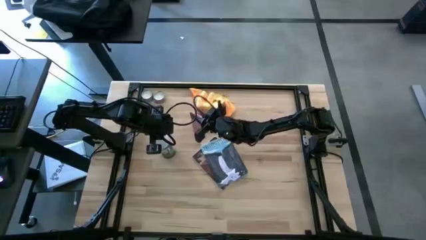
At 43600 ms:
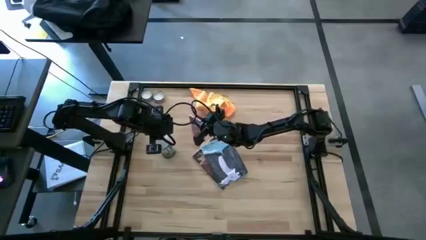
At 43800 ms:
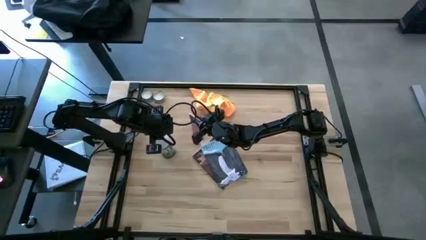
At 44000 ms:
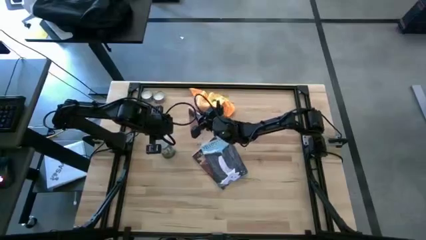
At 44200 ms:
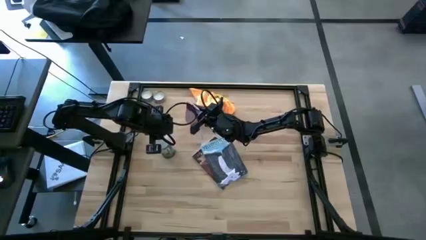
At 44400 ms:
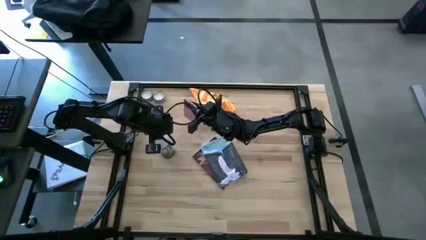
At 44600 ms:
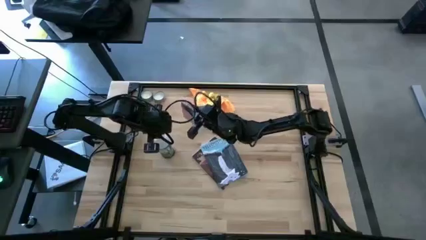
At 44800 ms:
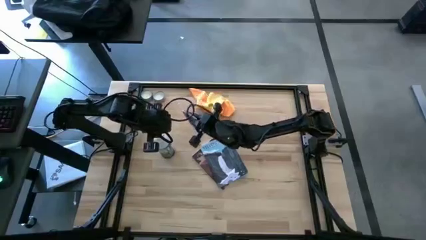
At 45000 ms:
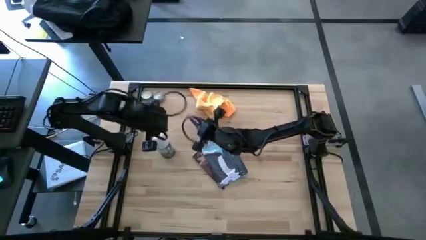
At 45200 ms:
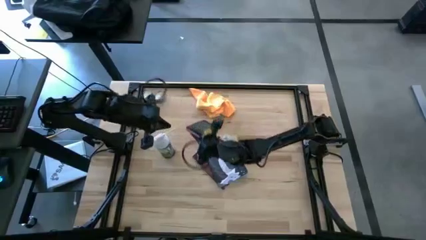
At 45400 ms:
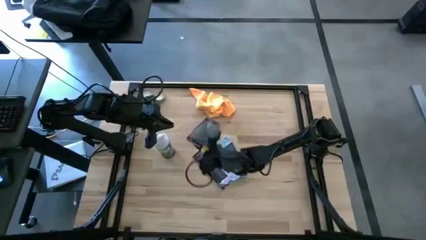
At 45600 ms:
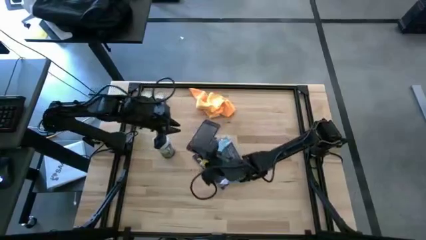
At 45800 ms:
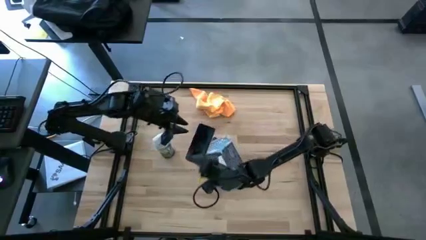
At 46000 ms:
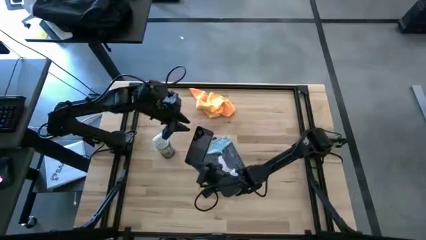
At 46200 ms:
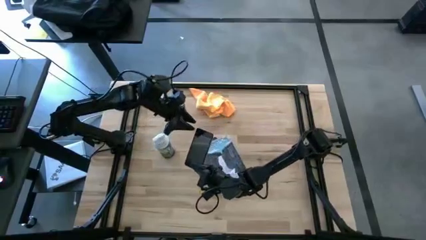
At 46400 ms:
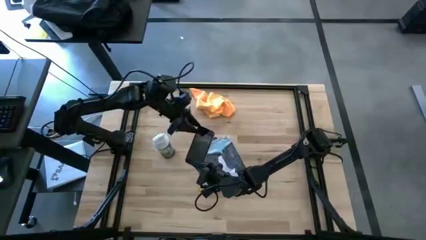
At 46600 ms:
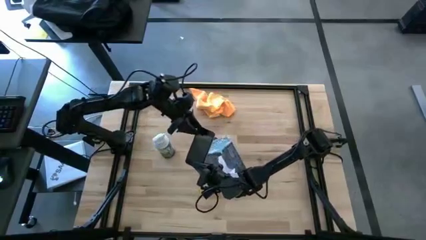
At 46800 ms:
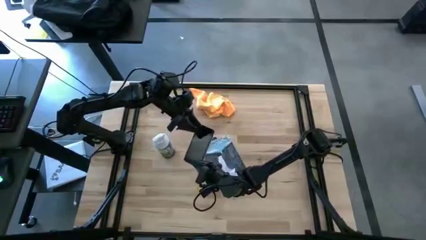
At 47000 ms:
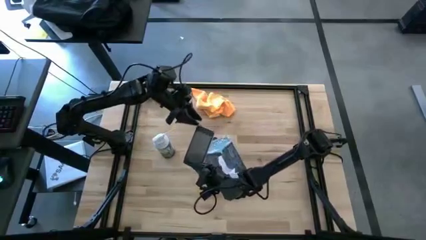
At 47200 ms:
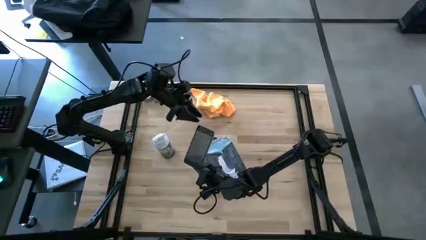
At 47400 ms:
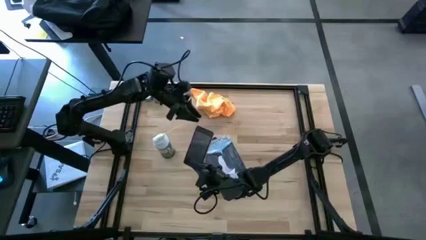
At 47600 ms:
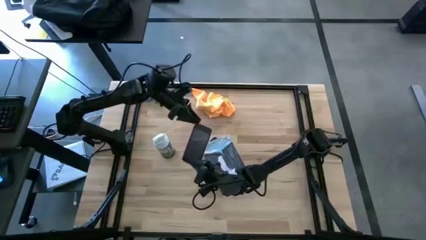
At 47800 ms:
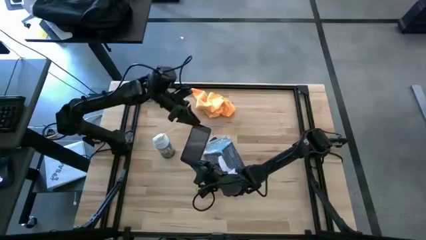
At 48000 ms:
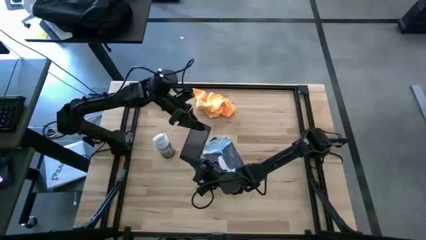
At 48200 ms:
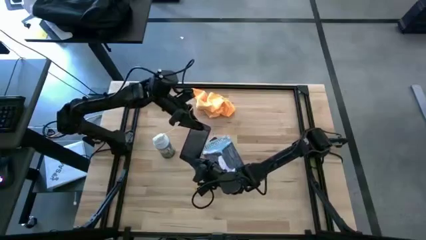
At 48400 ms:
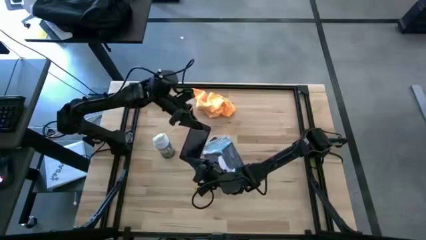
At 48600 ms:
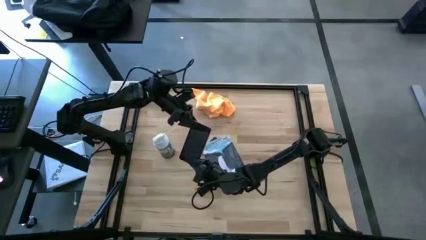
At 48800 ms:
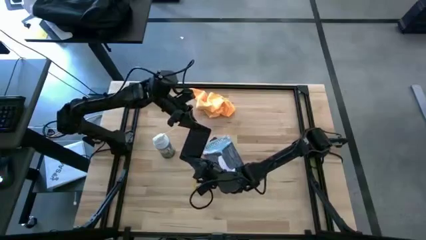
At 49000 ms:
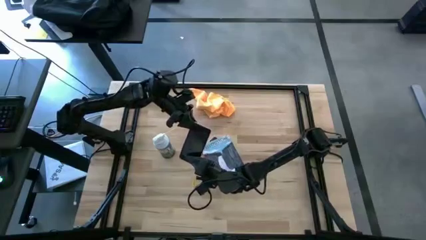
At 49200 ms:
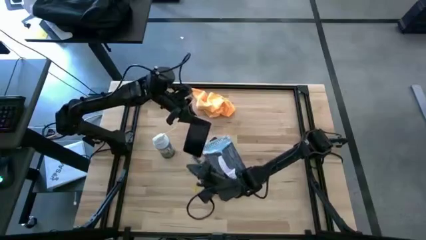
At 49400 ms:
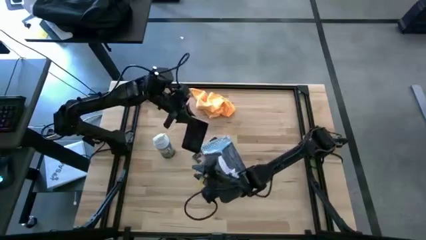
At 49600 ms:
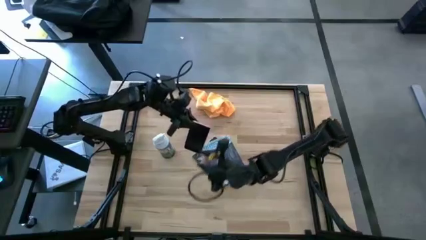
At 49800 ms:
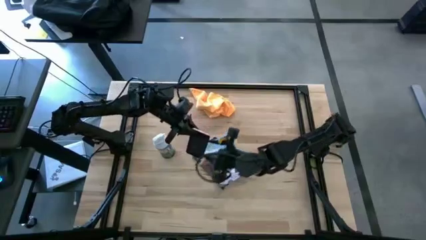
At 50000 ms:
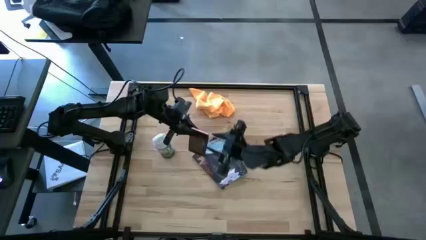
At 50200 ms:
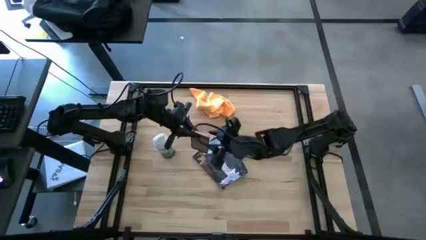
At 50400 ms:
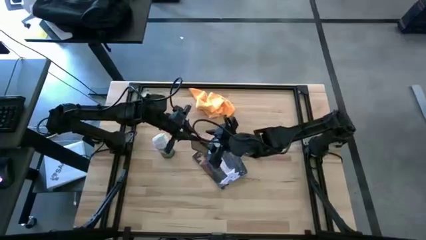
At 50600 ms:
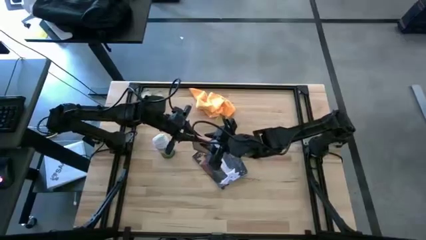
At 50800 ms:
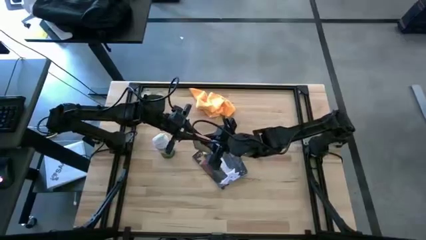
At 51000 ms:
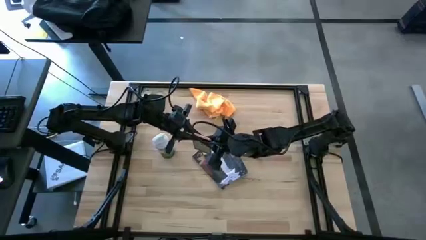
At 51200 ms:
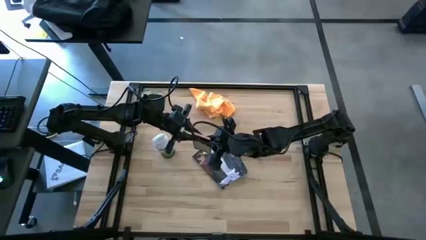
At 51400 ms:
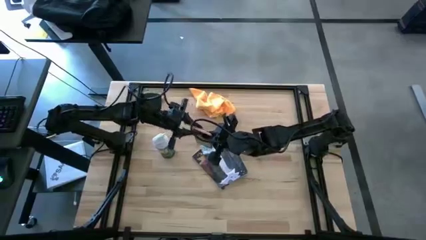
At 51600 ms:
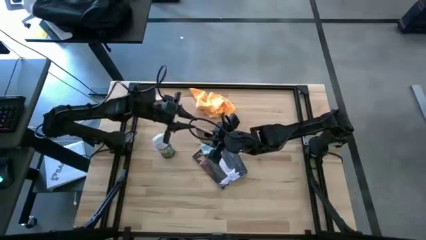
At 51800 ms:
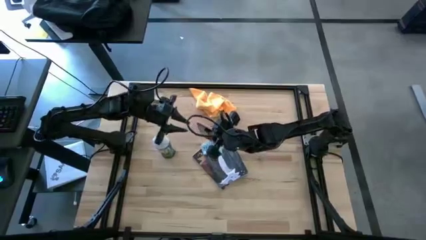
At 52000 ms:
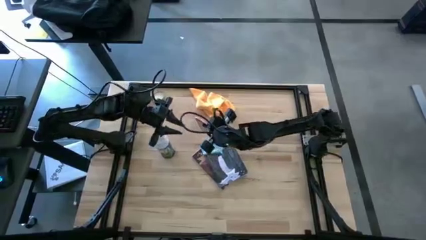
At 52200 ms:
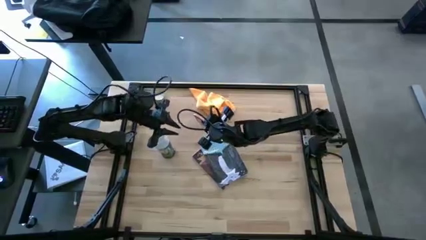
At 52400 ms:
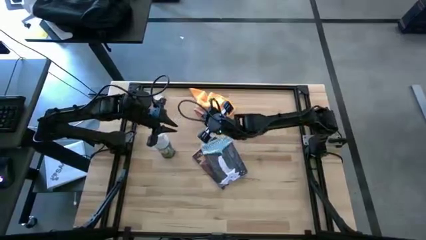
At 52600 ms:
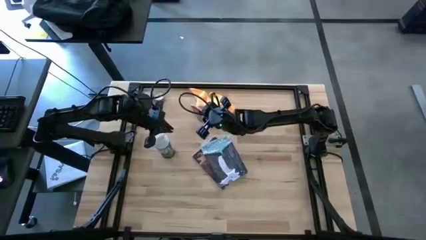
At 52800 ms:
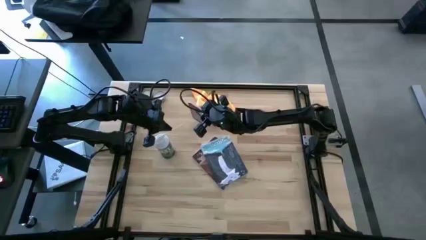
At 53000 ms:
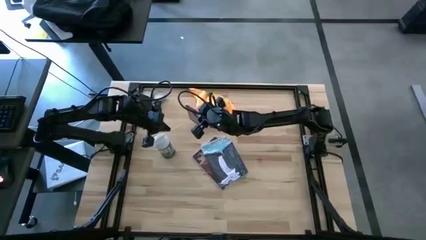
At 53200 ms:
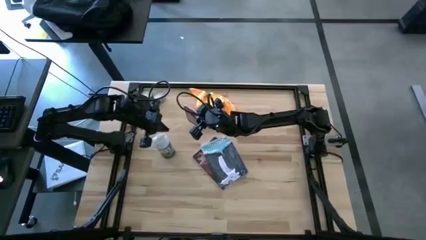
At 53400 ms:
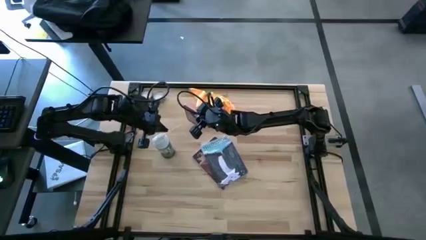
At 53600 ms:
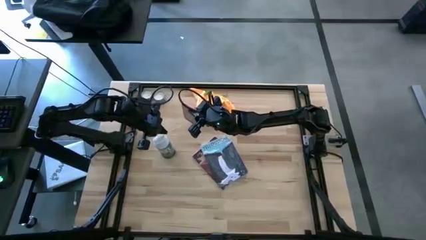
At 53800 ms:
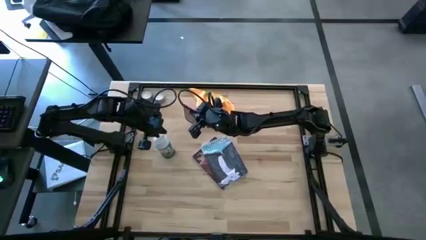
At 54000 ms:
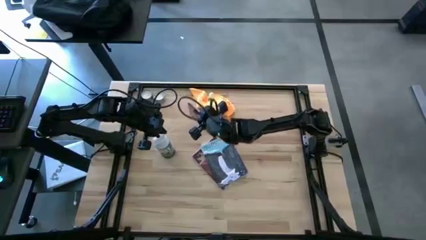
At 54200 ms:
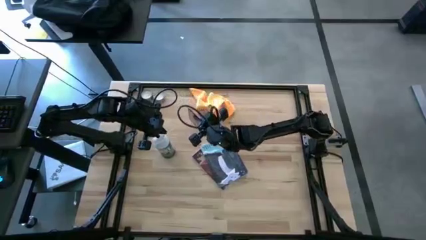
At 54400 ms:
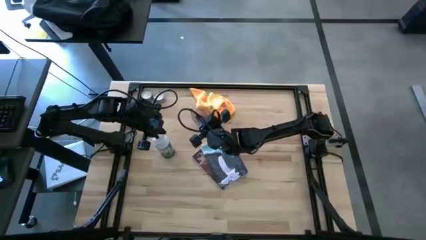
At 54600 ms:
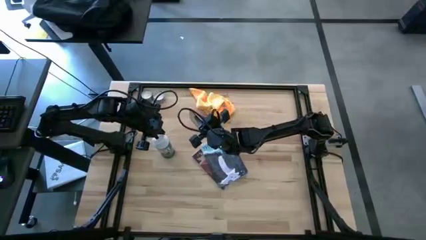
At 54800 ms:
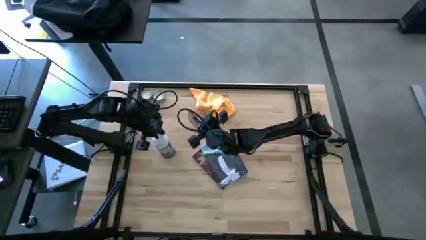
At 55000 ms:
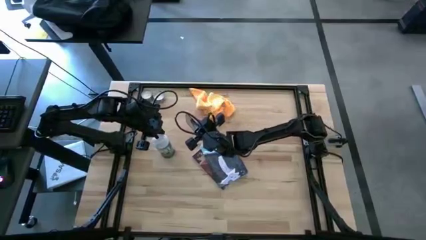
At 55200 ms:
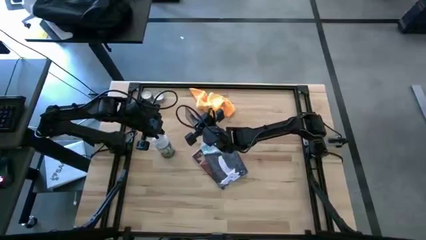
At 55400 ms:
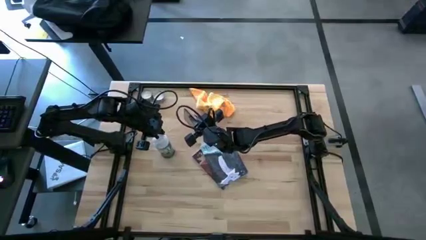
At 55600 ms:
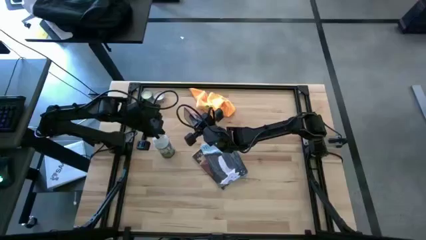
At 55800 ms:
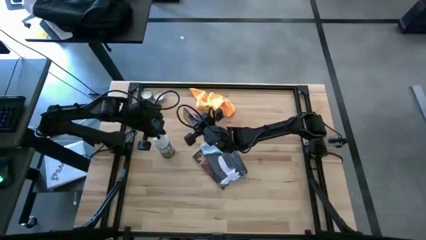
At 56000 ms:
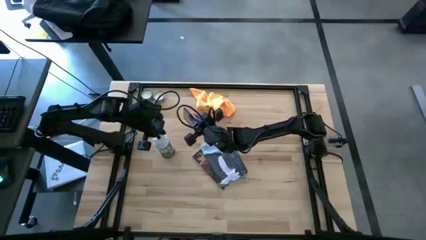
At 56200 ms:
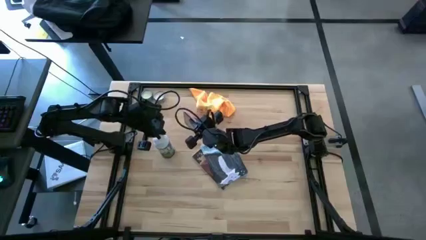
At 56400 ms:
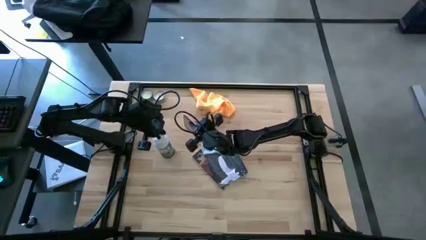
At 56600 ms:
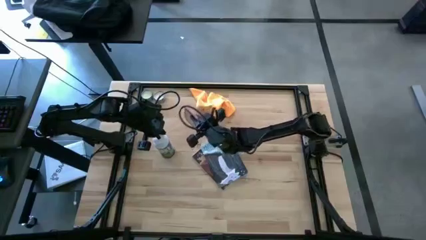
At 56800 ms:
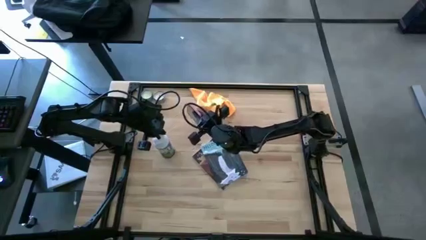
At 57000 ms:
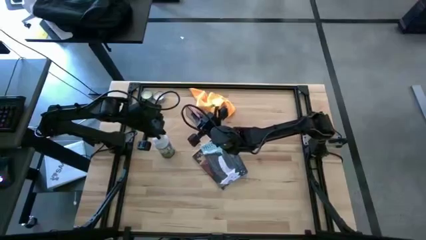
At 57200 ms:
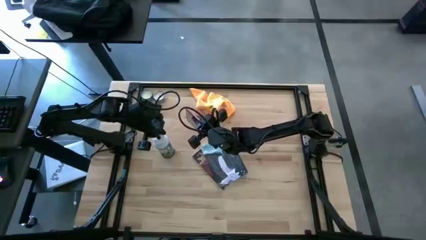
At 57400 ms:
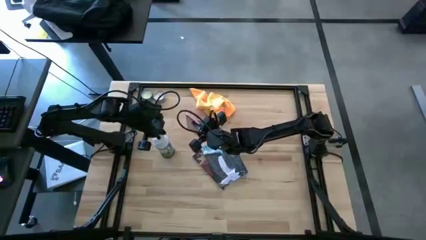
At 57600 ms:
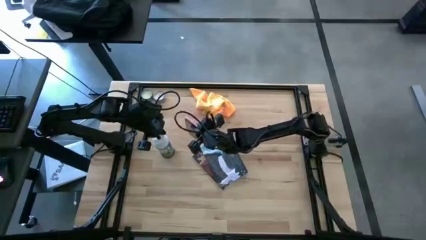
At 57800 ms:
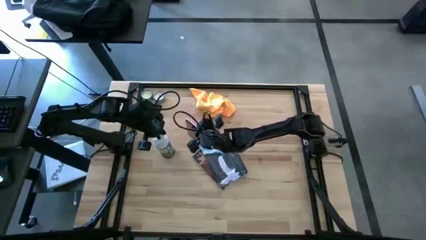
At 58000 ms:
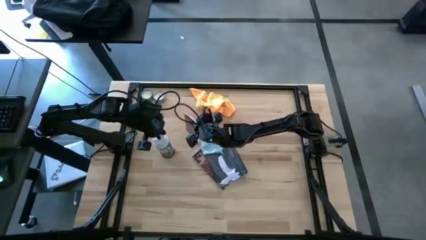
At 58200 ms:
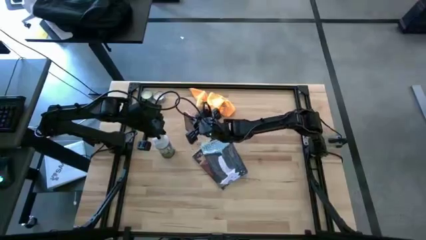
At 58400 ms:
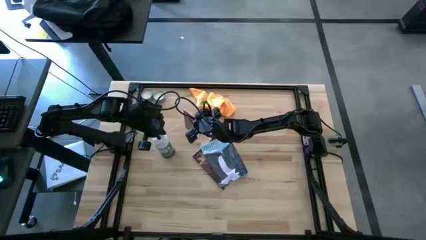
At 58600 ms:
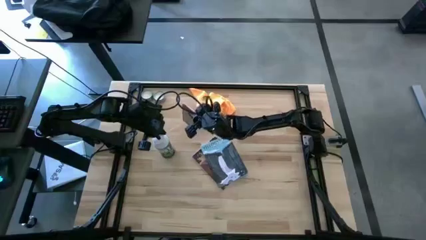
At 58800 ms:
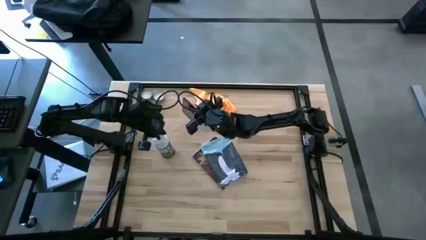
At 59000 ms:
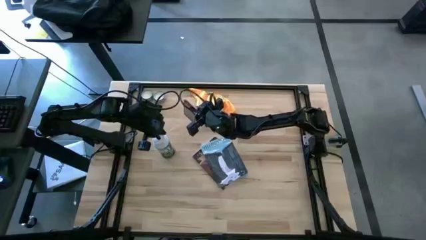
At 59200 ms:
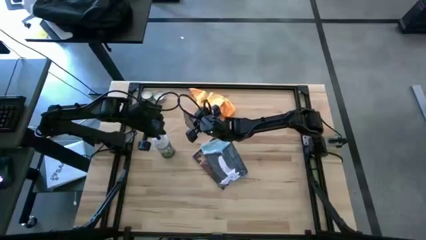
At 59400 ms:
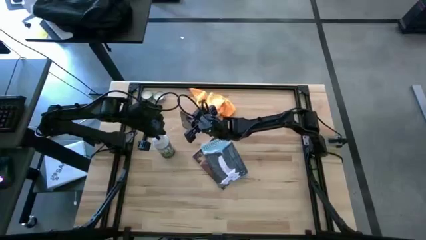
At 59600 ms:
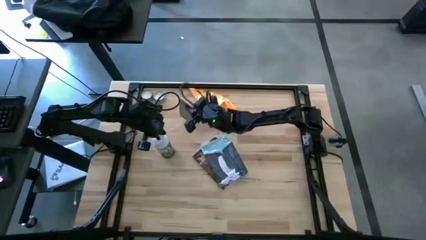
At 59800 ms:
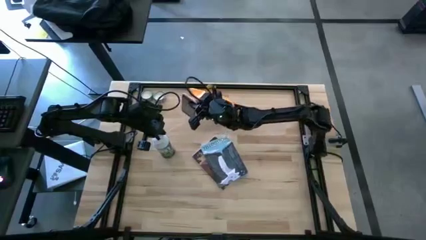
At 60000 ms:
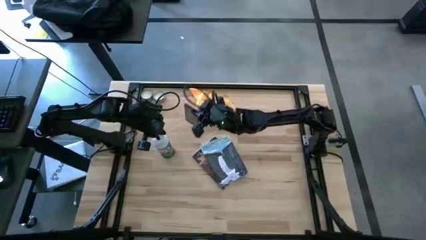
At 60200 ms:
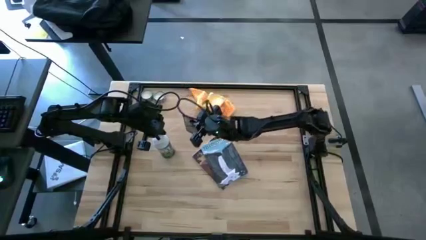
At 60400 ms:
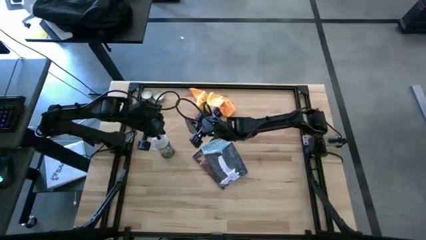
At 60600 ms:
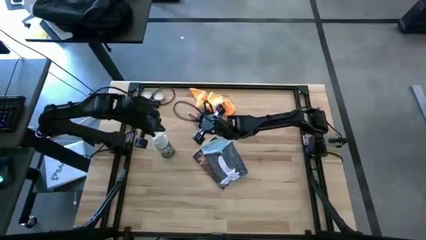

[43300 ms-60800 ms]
Task: Apply microfiber cloth
Spray the cellphone using the spray bottle
